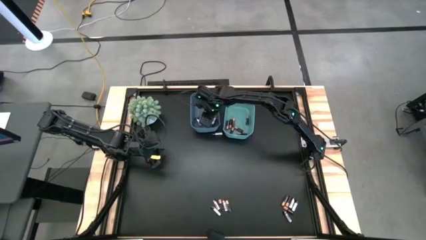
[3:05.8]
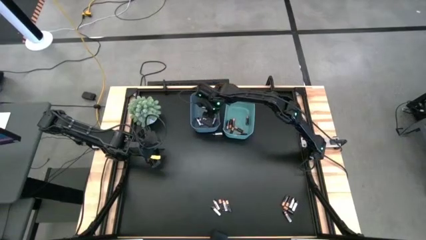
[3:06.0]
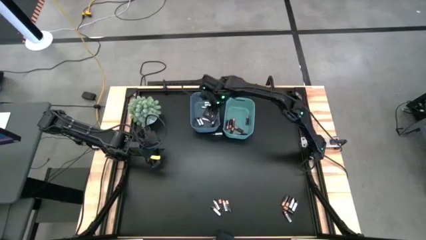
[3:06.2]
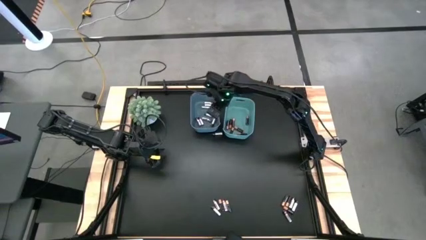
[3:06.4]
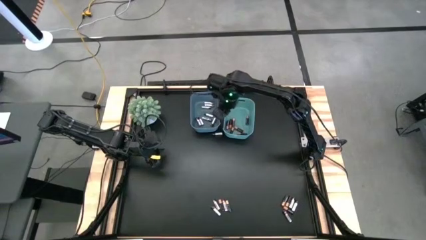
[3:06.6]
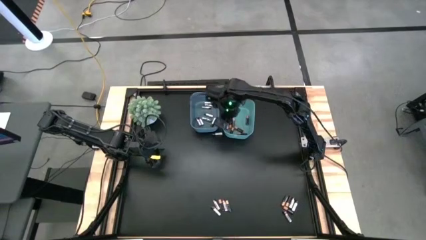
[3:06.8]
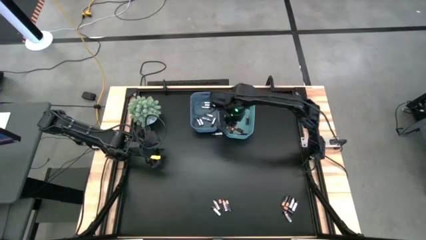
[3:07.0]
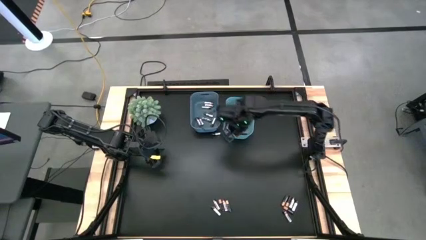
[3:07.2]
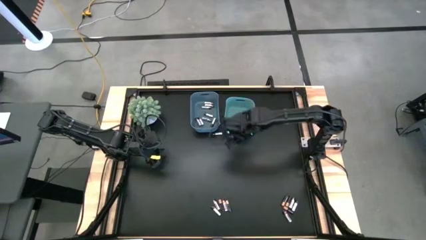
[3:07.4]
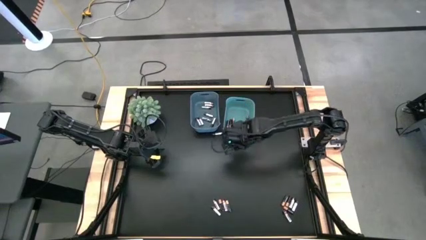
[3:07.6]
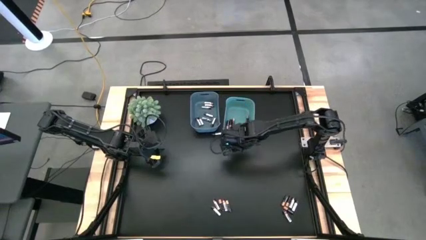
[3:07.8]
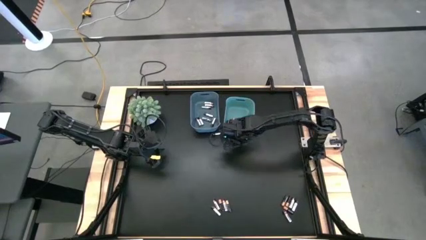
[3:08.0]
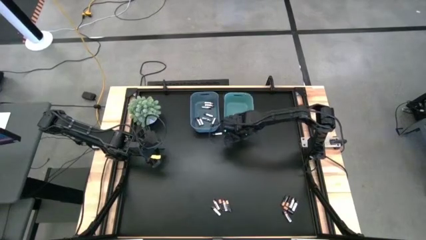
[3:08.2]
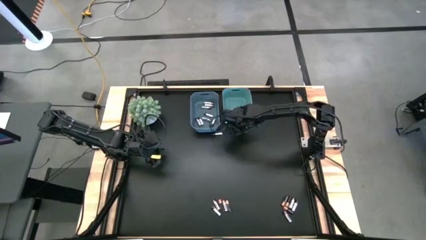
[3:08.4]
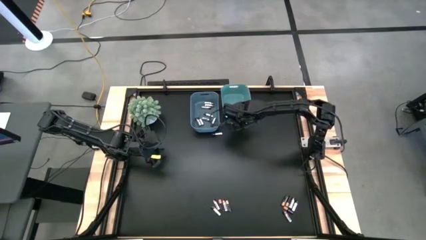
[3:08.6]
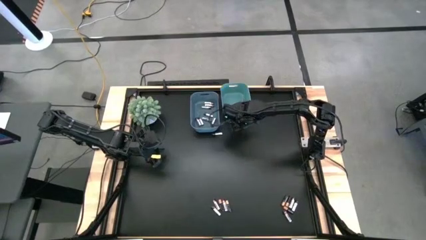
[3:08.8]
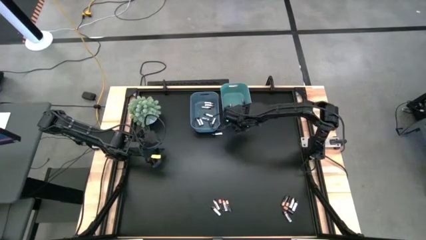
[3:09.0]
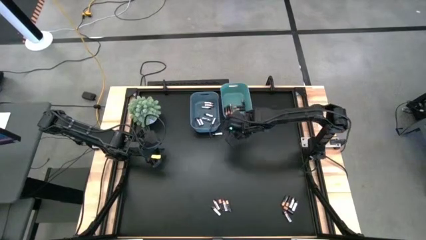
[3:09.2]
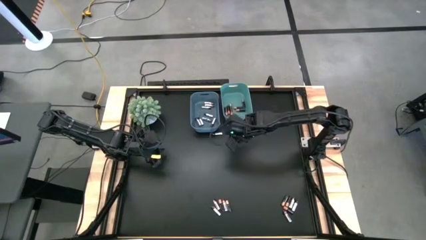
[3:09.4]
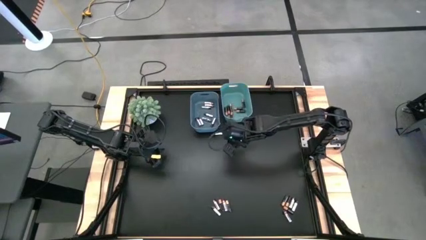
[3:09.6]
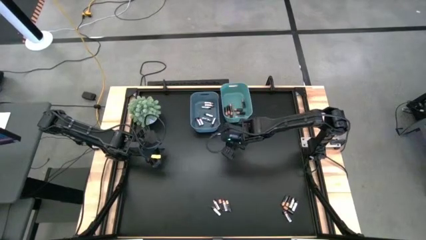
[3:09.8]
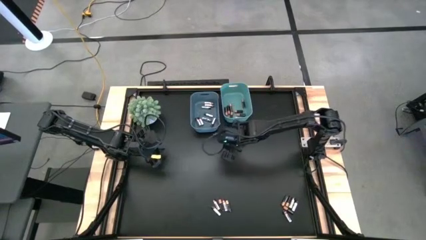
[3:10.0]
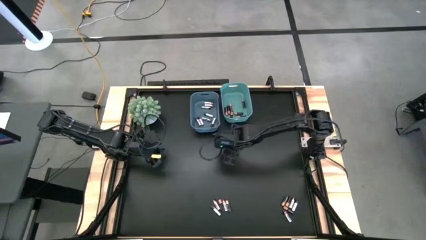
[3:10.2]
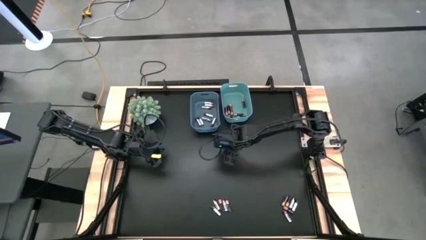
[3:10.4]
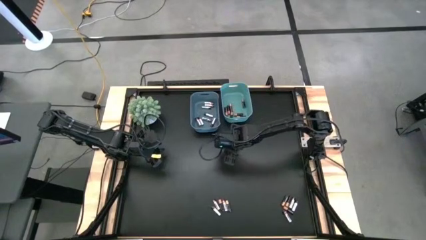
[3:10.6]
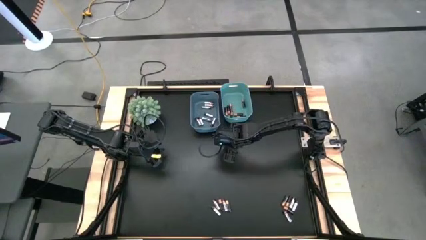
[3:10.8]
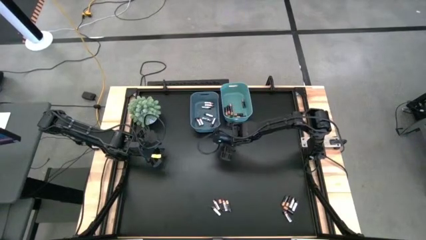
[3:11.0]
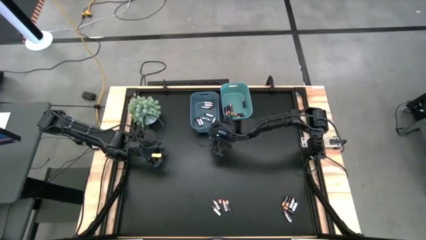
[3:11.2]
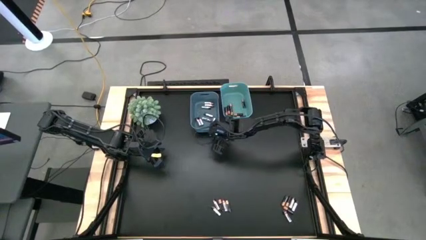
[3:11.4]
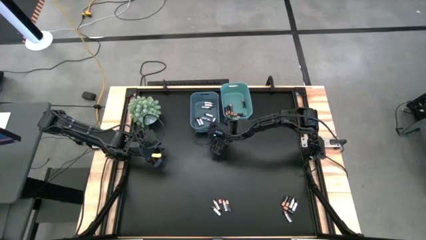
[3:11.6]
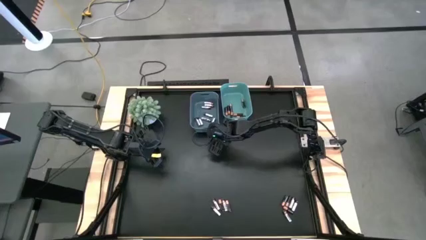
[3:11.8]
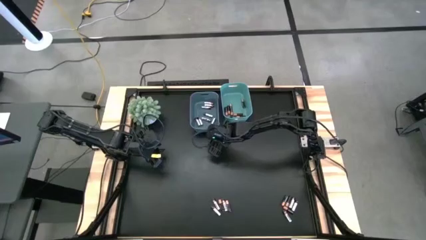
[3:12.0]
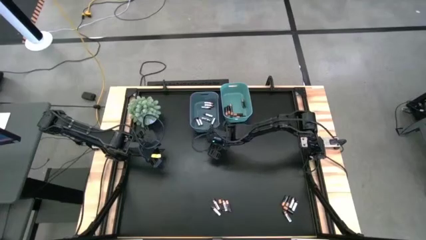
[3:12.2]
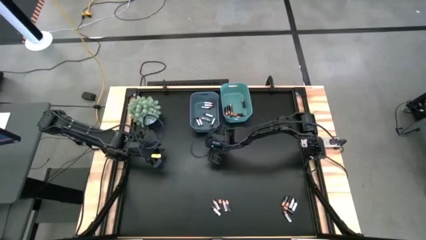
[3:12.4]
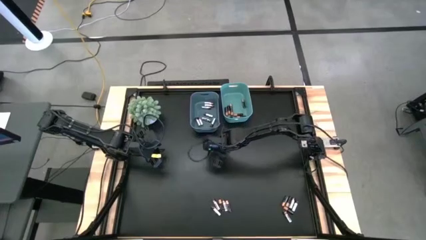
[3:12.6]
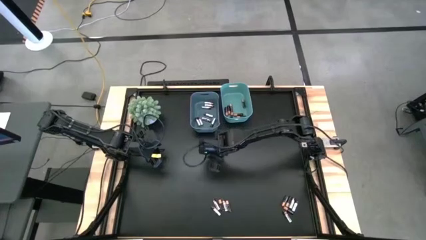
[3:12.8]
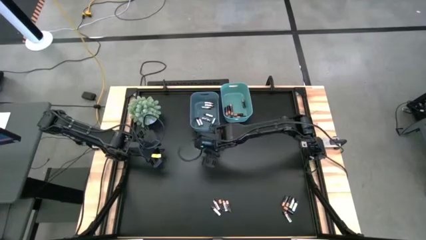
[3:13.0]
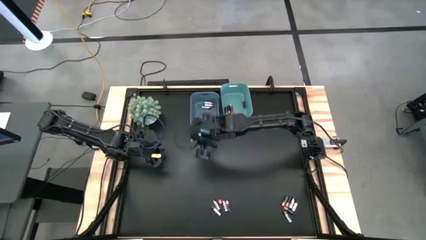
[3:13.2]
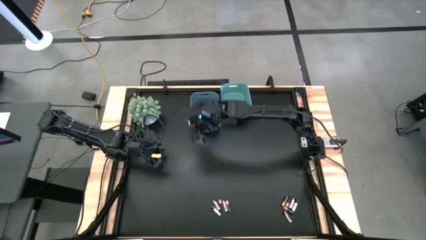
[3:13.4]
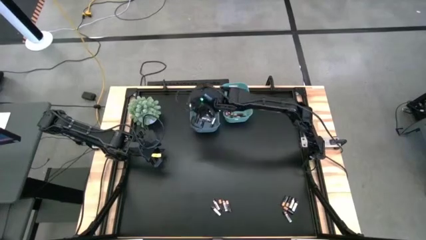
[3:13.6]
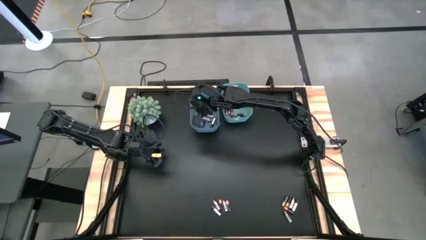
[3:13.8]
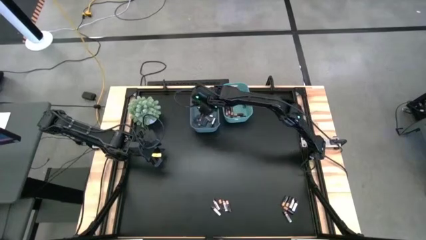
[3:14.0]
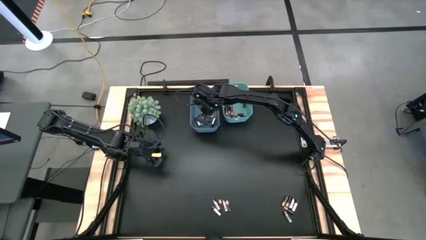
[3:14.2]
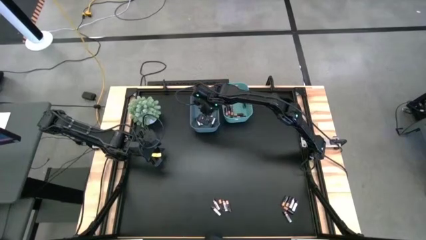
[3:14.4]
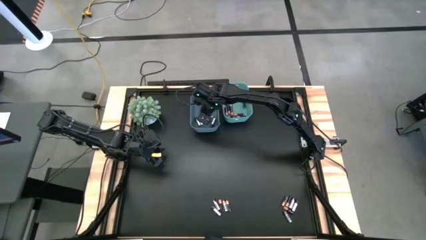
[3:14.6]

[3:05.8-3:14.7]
Task: Sort batteries
Put the silver battery into the blue bin

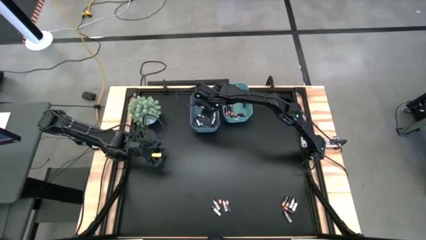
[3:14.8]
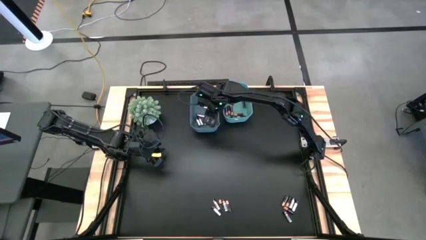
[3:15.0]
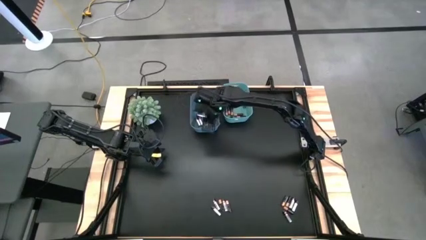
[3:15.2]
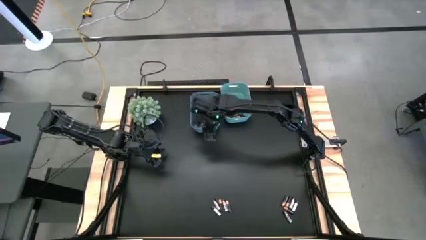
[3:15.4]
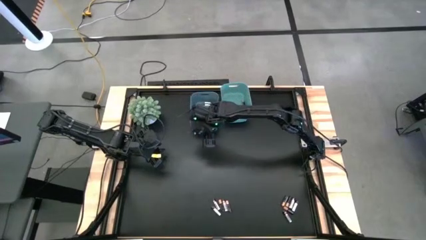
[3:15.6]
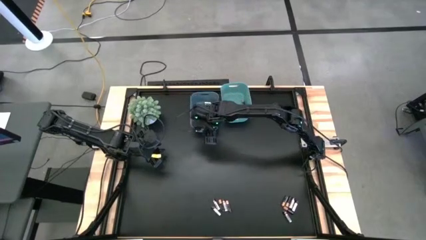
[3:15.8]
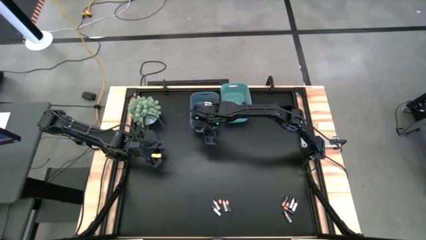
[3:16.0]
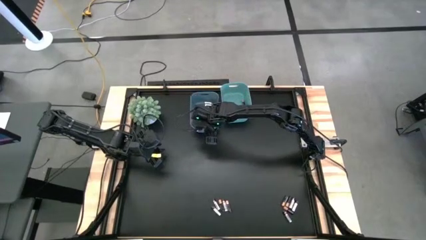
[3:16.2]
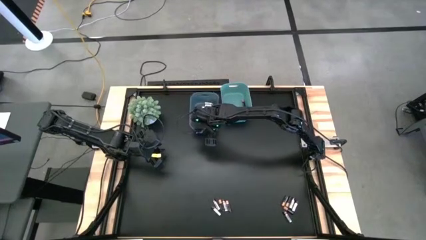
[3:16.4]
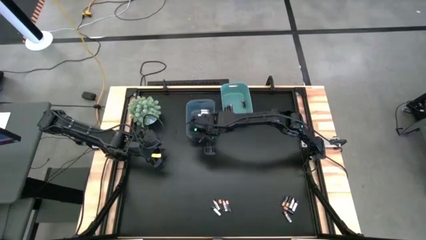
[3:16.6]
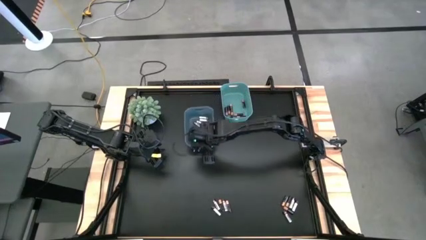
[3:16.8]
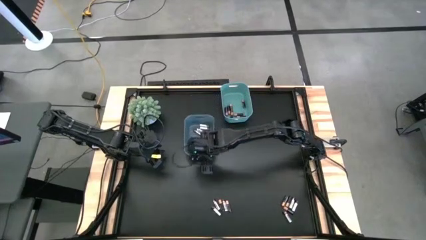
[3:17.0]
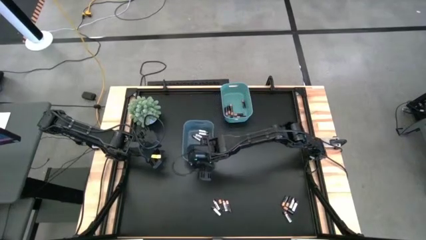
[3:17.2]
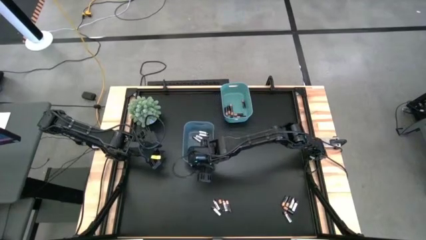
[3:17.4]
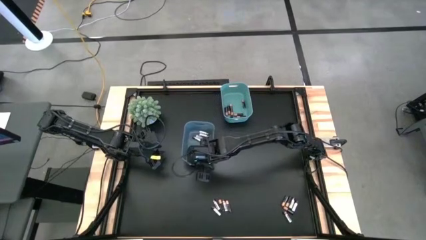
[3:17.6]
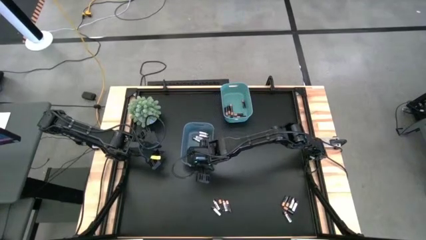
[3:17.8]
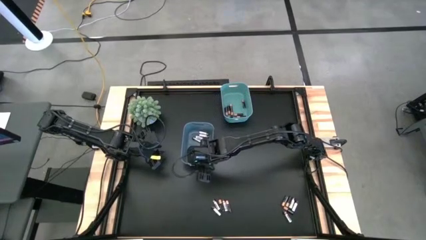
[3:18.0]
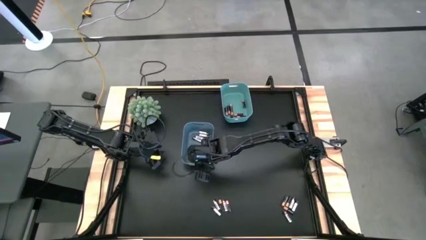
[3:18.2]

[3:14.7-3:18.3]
Move the blue bin to the middle of the table

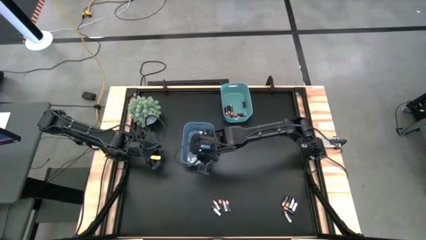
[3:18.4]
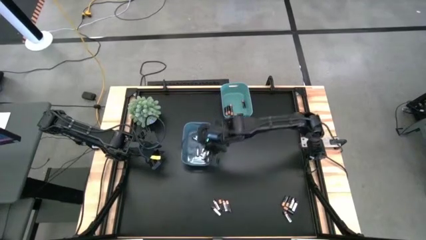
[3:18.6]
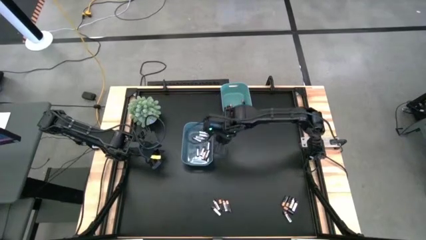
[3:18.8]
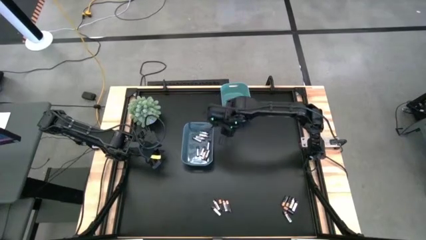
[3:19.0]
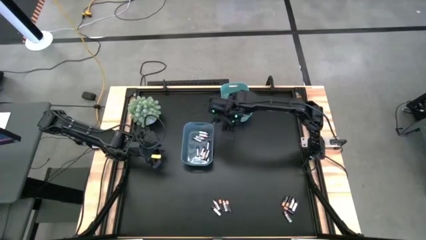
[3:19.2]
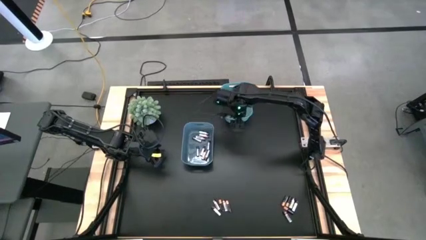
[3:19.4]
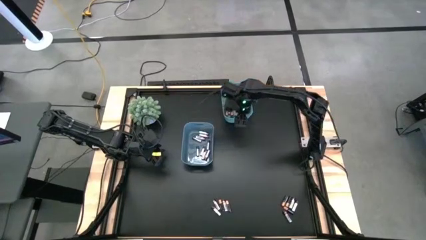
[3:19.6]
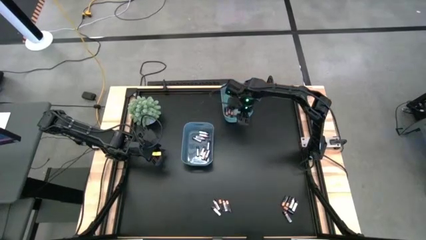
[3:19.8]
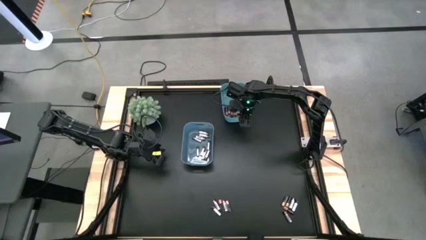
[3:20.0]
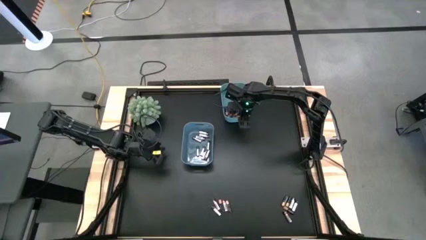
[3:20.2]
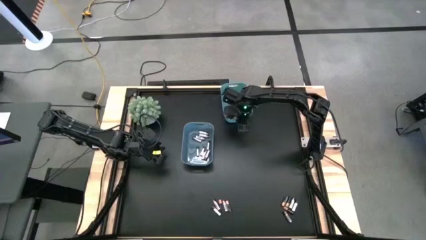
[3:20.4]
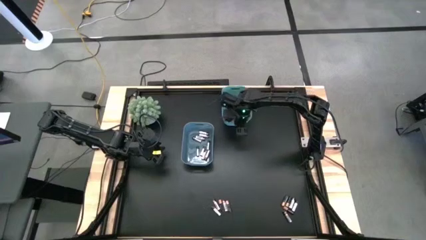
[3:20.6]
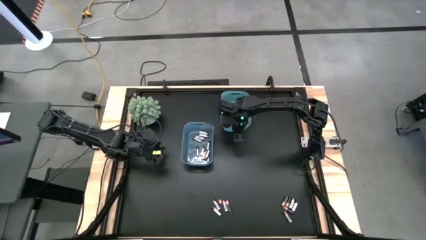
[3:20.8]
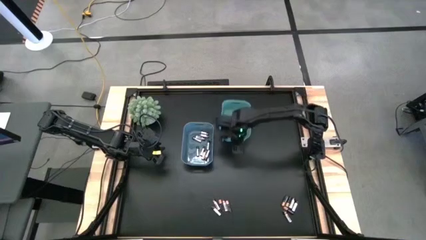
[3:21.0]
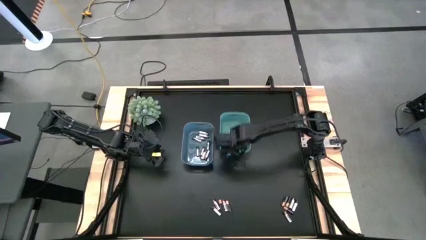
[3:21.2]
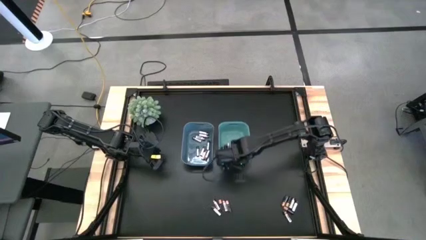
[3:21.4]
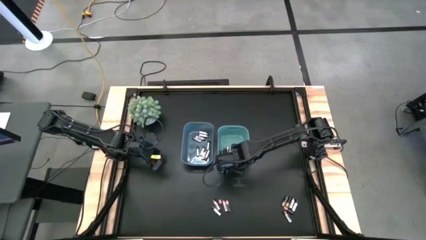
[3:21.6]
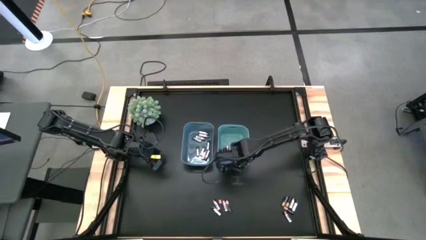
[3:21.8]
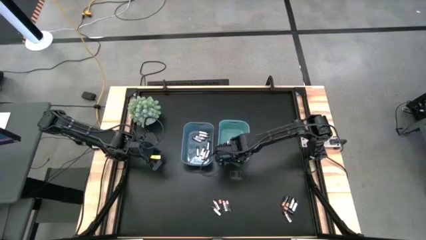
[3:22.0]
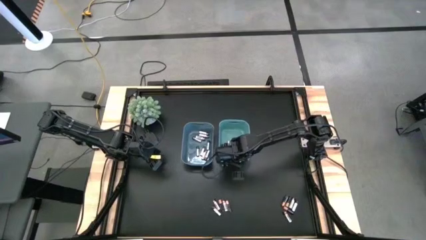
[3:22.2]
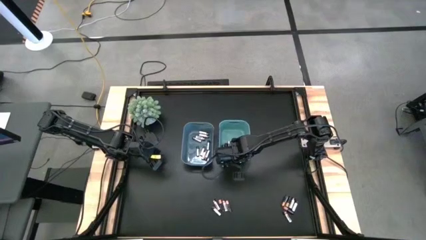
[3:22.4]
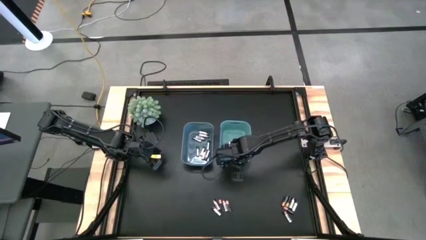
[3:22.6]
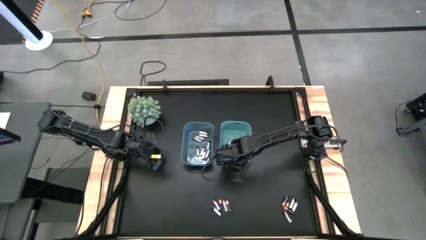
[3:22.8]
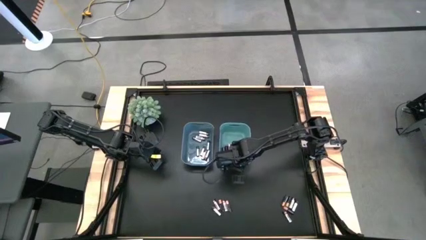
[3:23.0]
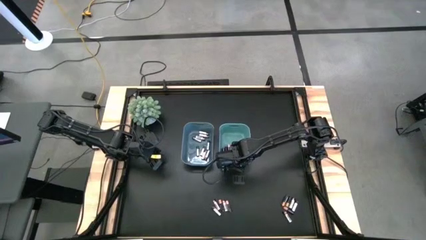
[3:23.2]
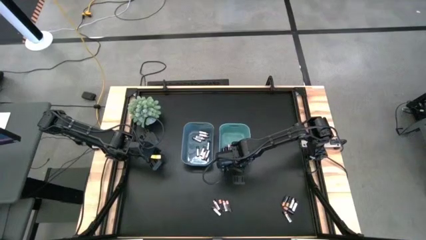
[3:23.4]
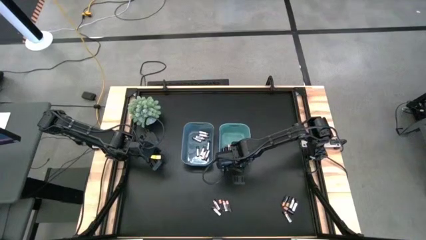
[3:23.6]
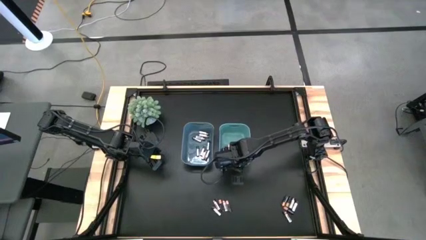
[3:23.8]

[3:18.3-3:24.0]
Move the green bin to the middle of the table
